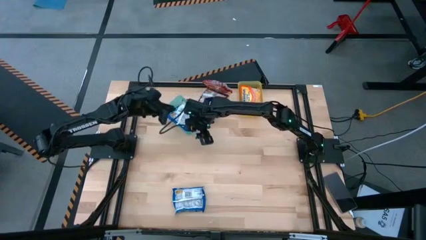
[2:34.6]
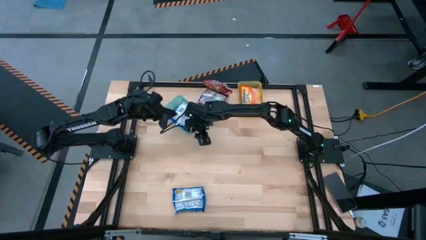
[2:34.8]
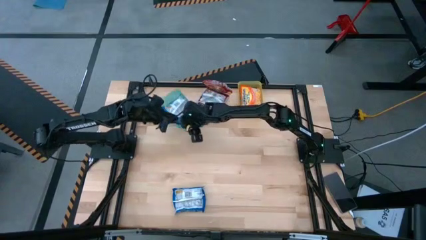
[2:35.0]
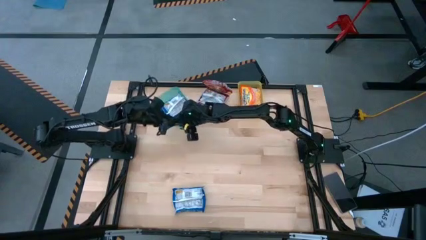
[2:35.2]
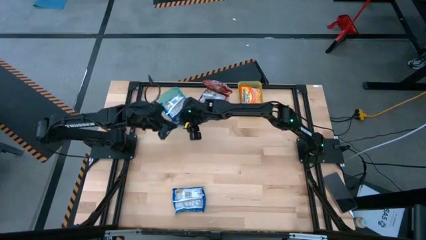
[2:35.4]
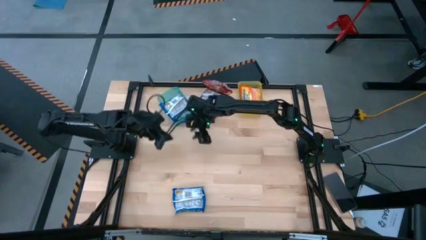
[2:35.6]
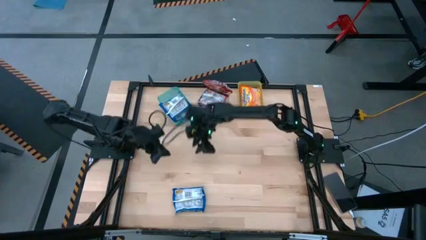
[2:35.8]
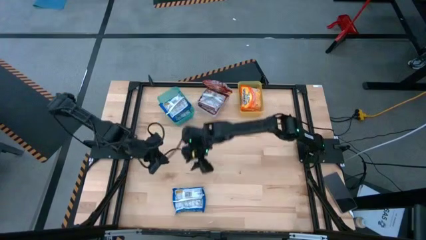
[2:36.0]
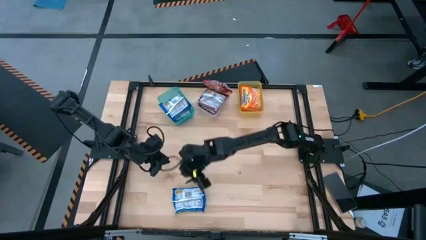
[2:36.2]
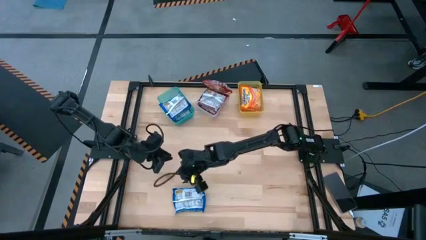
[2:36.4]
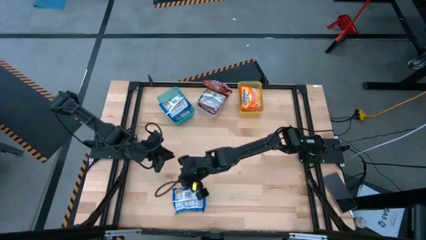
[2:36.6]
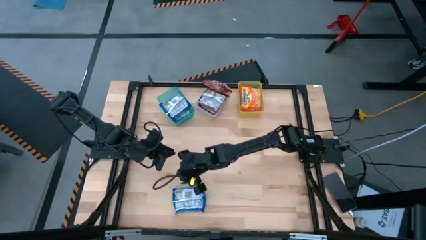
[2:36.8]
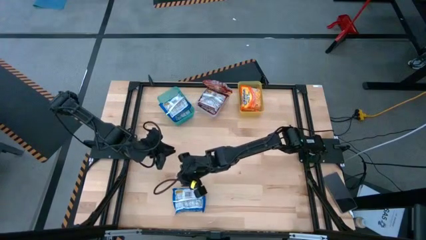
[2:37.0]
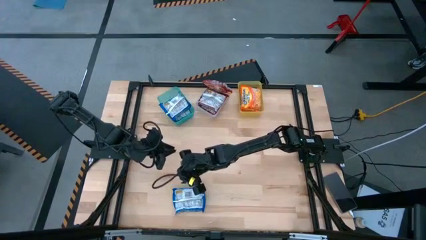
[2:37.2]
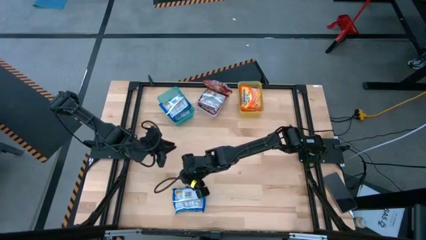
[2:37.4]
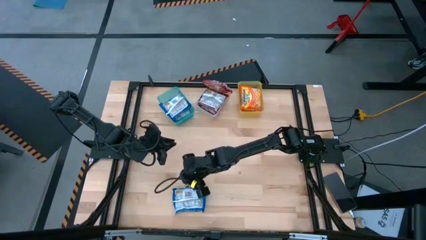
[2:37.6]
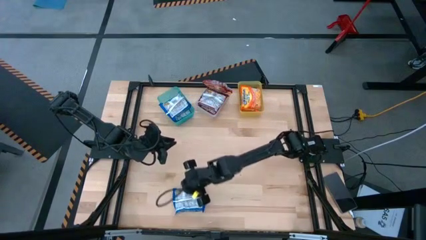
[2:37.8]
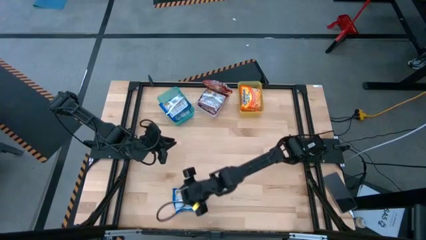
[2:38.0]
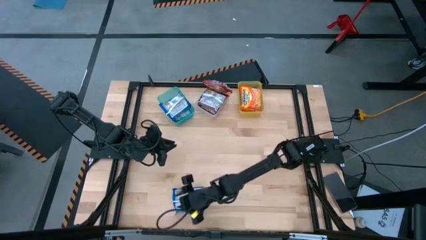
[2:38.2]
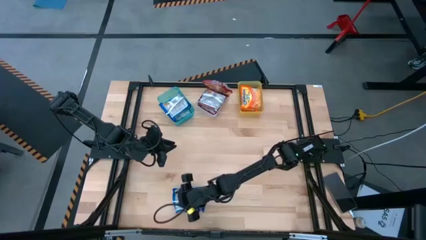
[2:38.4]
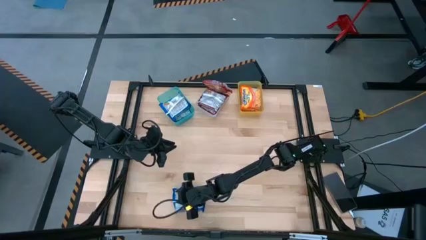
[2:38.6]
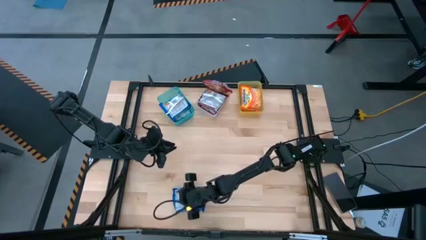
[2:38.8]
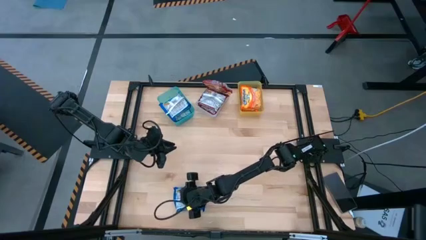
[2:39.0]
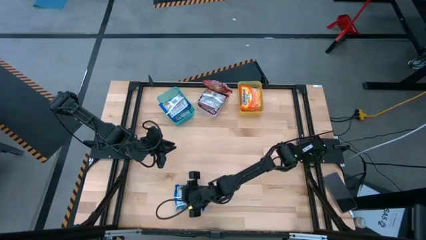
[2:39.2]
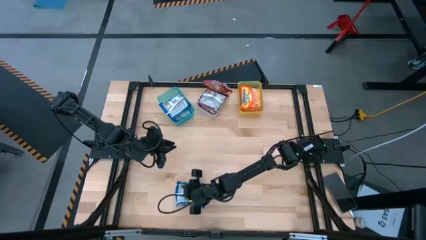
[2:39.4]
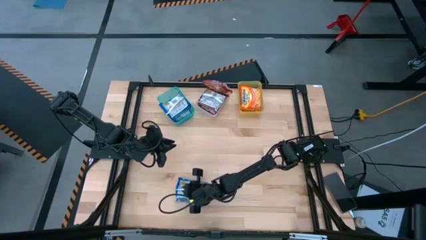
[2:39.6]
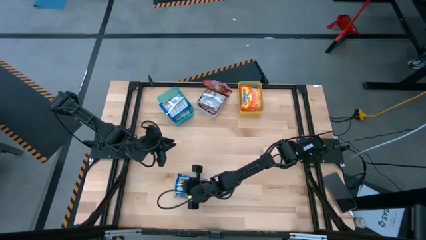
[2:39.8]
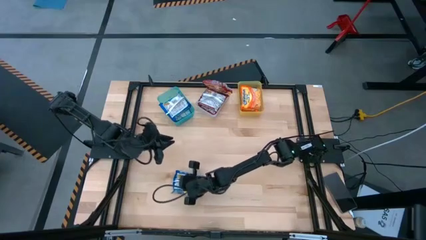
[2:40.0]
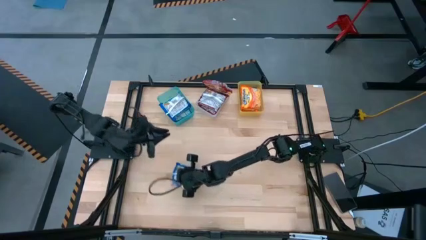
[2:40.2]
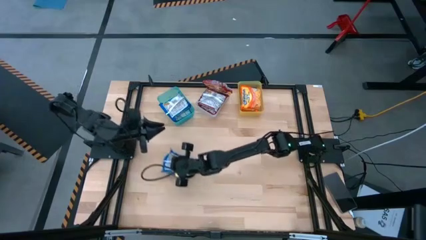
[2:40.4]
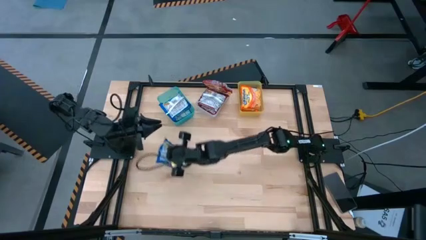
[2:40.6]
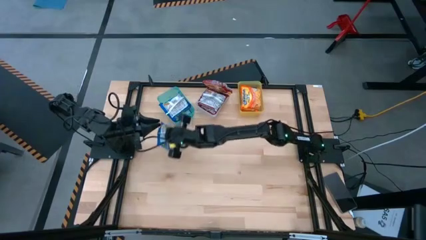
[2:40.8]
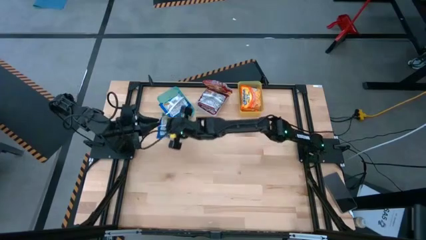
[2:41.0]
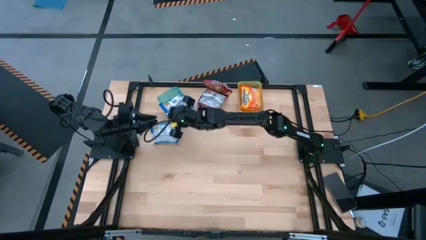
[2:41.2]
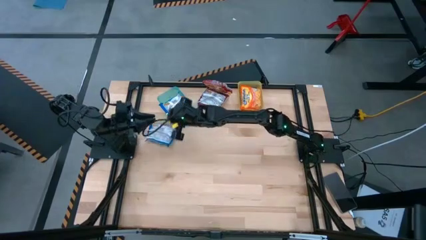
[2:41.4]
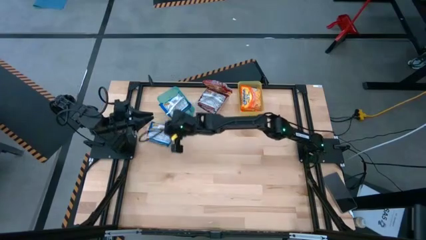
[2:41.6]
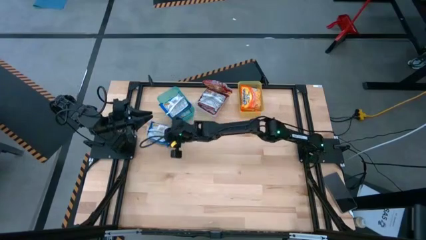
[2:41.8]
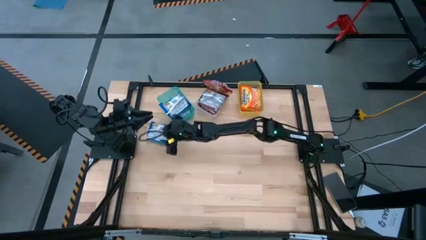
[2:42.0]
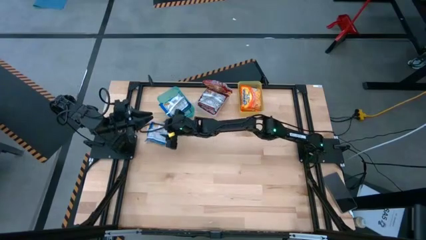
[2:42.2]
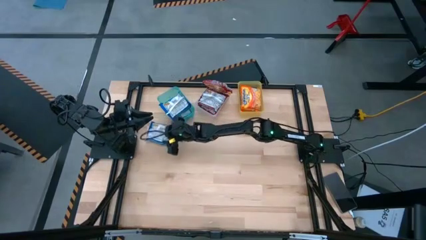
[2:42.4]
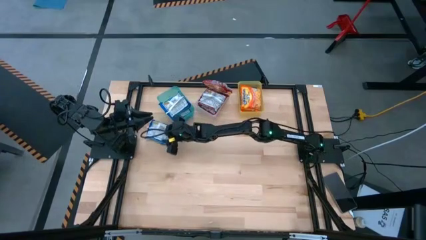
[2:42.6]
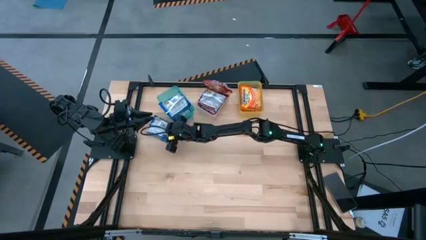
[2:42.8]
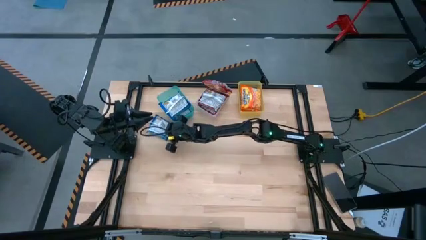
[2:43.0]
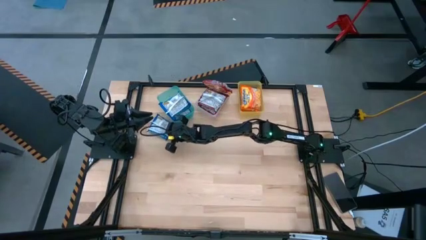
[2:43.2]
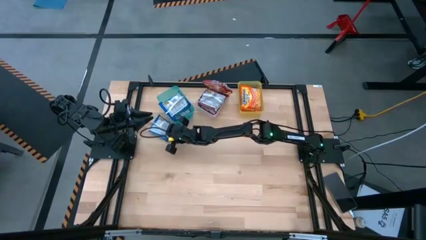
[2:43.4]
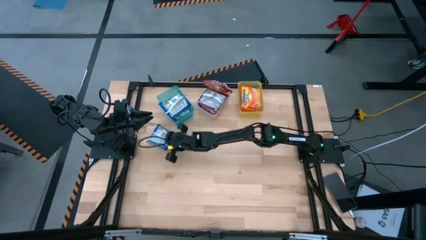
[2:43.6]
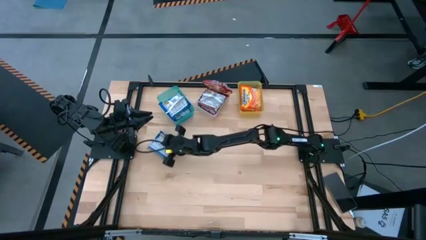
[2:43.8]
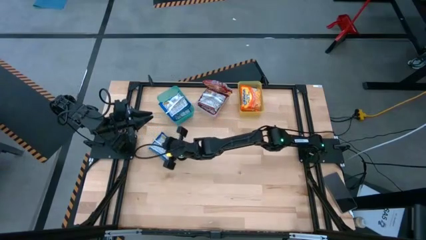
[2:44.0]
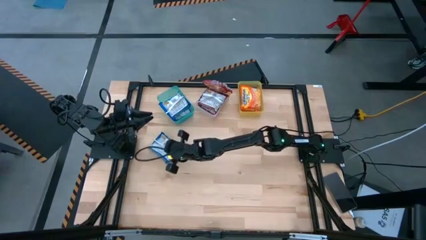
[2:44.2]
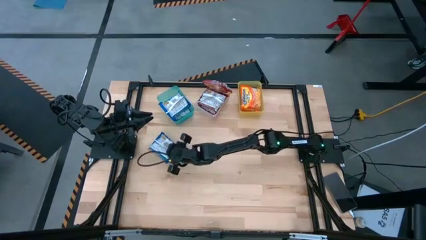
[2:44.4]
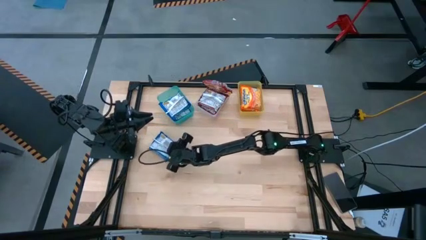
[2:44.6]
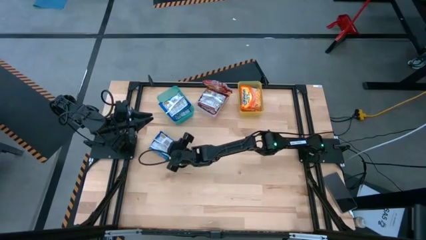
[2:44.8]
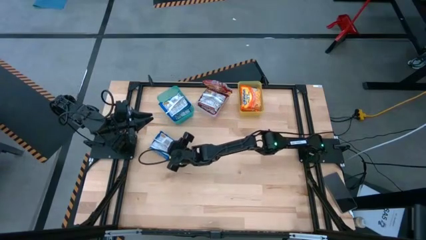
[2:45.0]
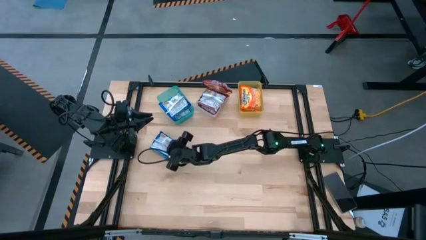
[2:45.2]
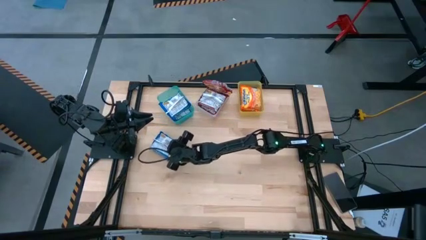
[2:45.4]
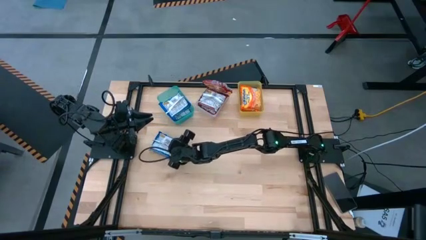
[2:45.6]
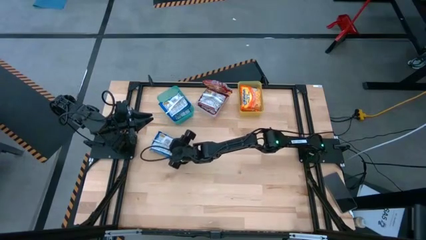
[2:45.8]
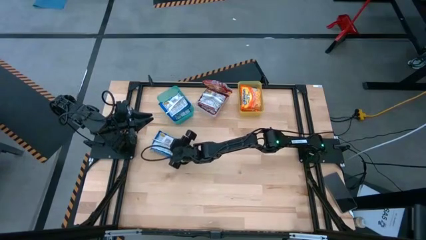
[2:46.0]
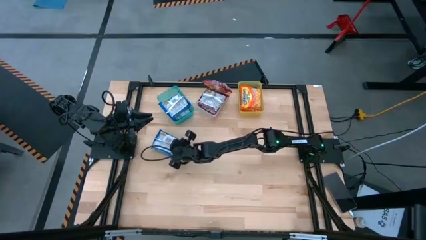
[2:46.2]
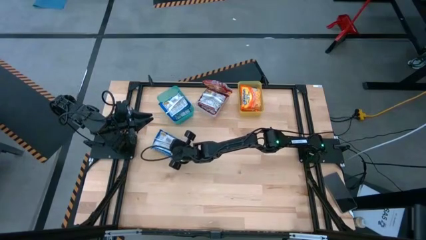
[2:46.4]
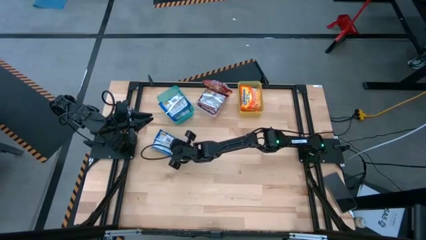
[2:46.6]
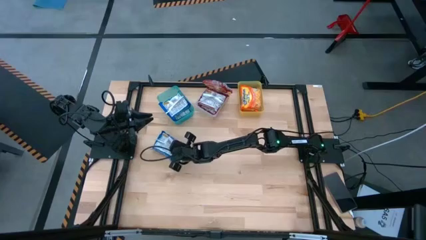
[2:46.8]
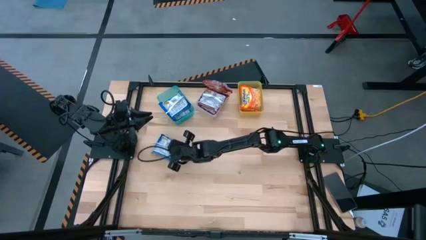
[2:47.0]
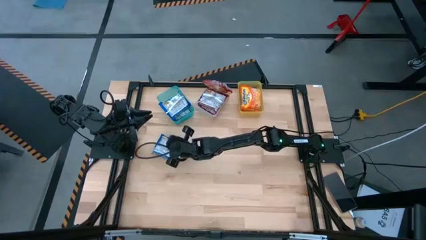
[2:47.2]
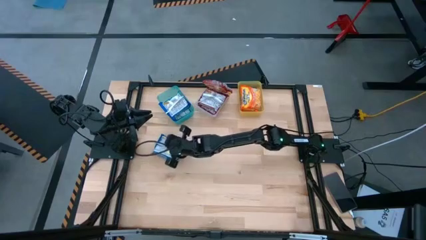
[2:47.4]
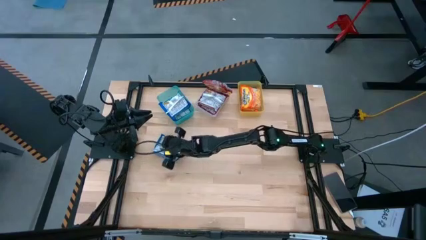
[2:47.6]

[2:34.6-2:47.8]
Task: Sort Maruchan noodles
Put the blue noodle pack into the blue bin

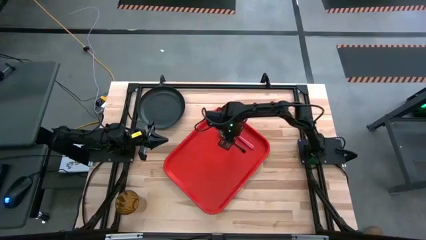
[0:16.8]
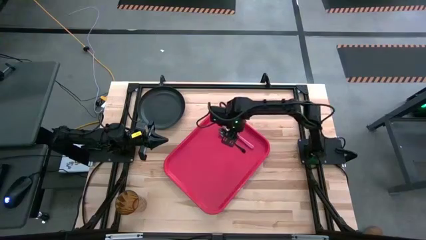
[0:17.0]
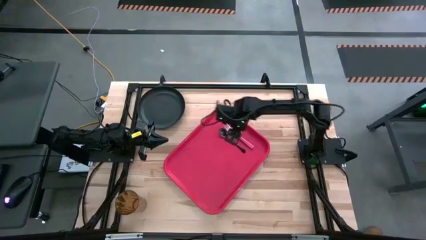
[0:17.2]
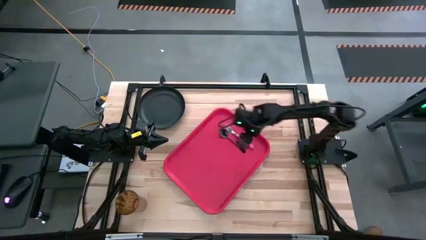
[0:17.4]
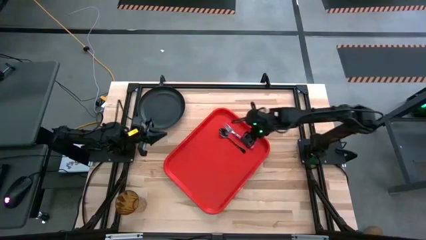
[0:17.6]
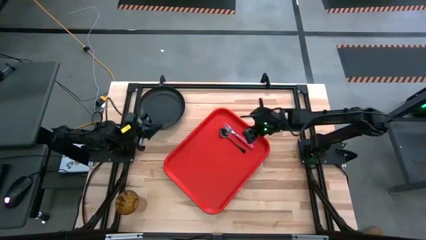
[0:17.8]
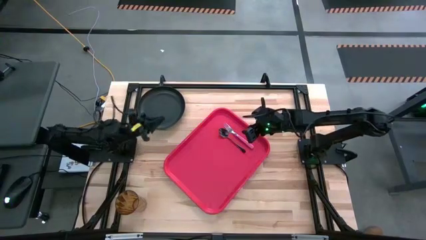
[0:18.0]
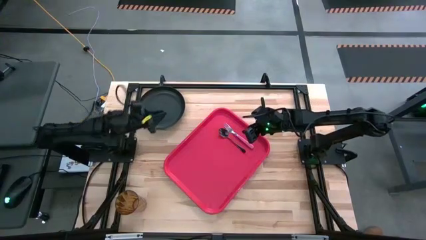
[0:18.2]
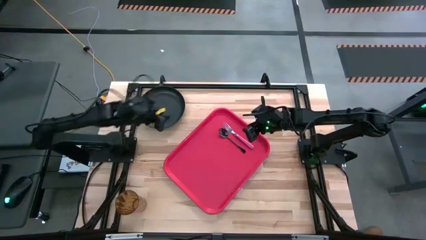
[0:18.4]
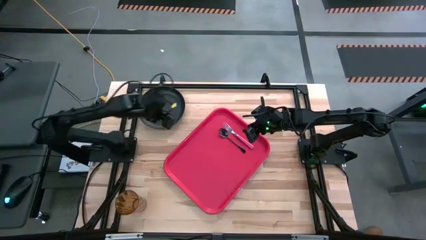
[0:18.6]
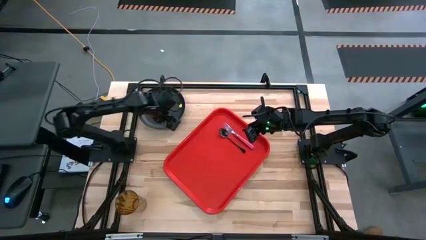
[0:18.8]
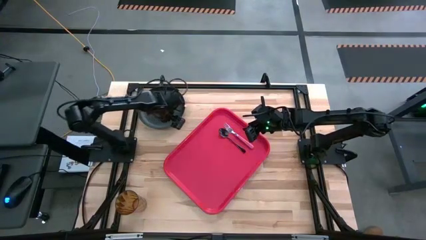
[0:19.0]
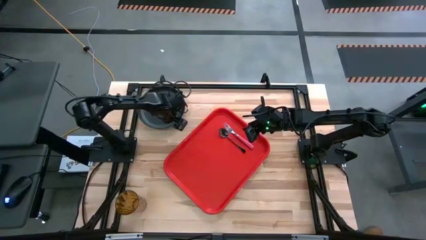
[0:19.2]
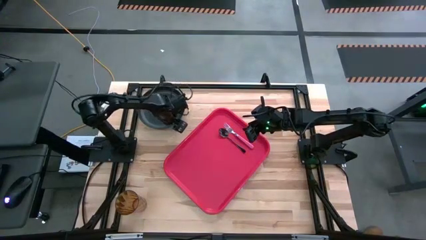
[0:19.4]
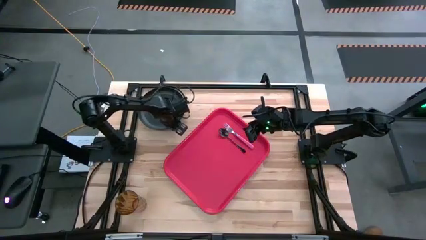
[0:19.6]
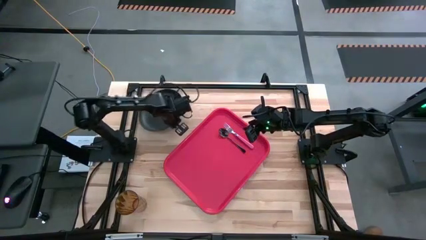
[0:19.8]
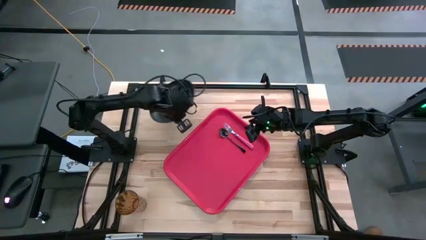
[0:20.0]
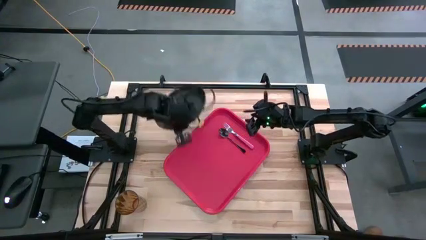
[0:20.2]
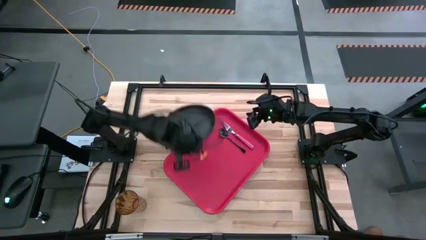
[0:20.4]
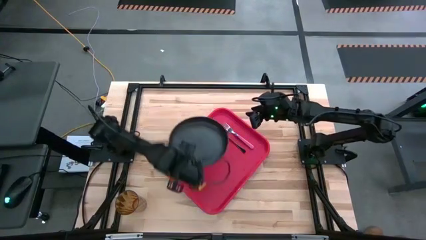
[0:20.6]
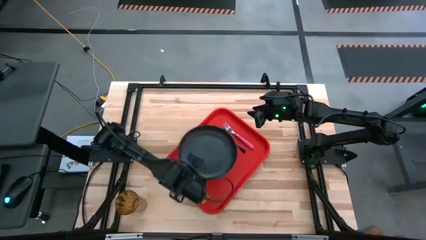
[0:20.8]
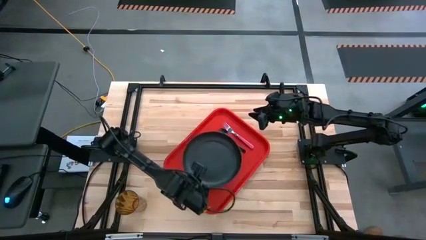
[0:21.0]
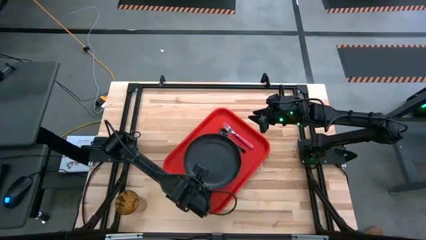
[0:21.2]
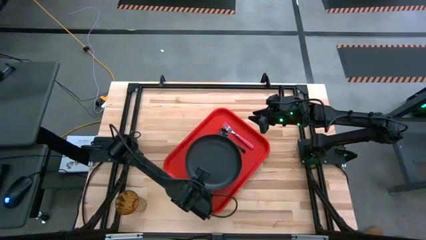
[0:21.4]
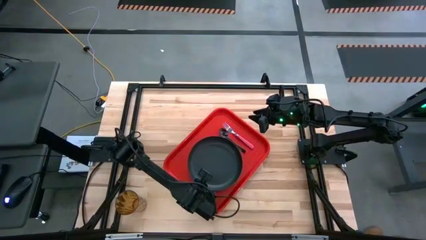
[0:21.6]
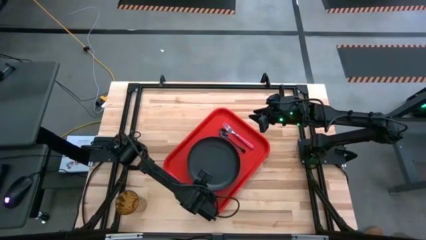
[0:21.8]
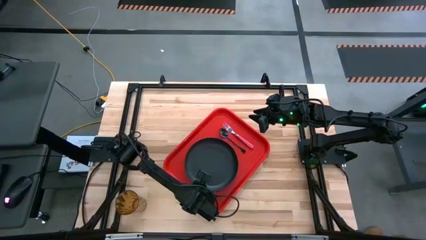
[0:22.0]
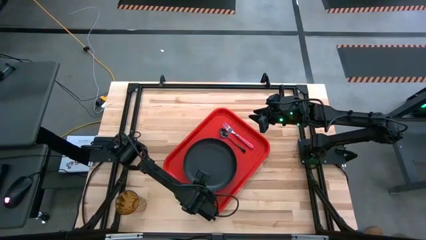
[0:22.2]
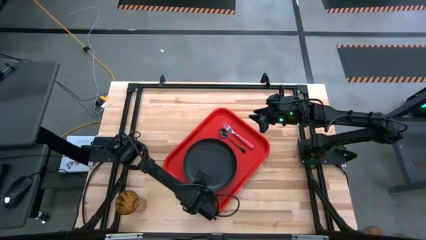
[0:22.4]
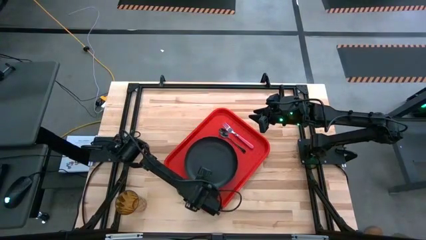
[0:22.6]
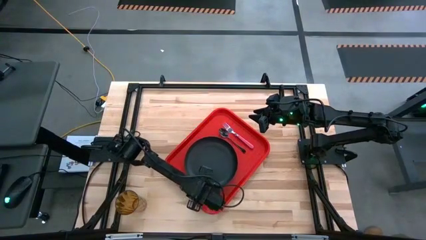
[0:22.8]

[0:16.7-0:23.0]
Task: Pick and place plate/cup/fork/spoon on tray
Put the black plate on the serving tray
